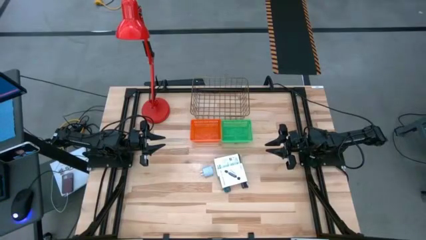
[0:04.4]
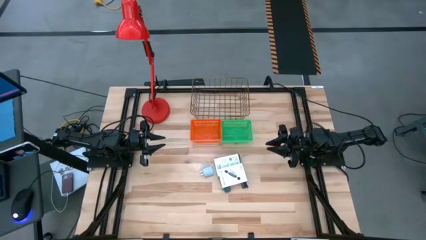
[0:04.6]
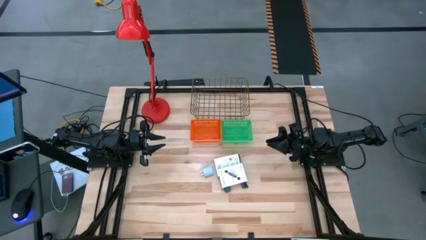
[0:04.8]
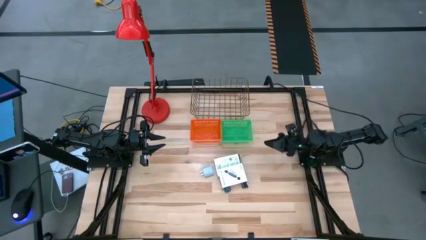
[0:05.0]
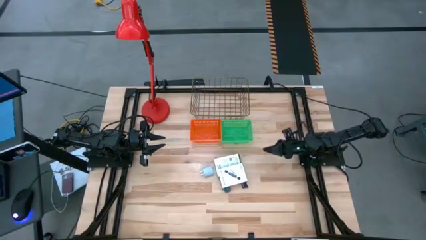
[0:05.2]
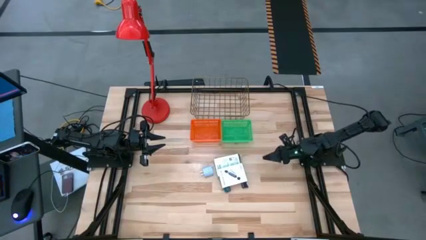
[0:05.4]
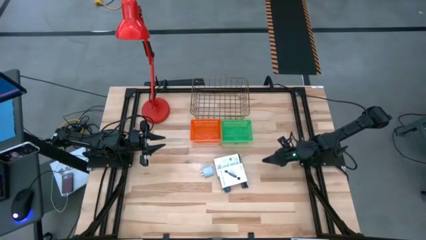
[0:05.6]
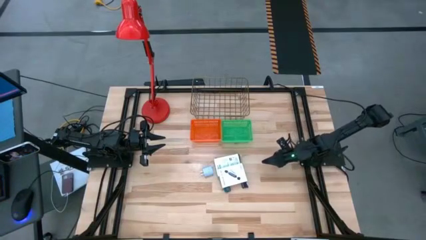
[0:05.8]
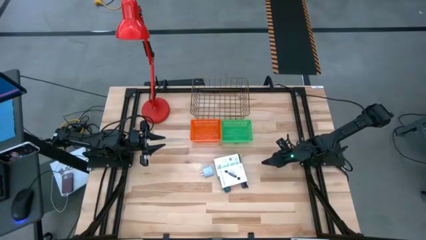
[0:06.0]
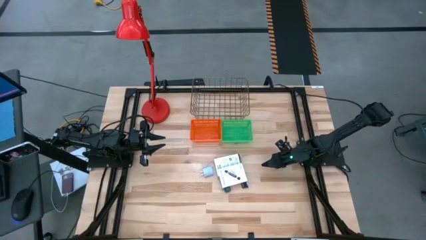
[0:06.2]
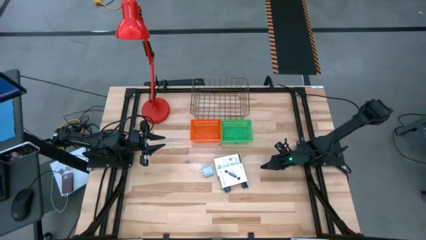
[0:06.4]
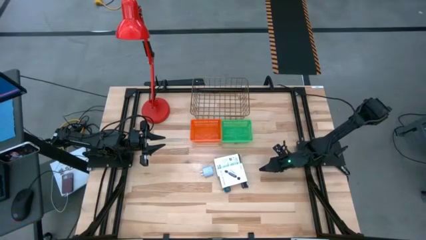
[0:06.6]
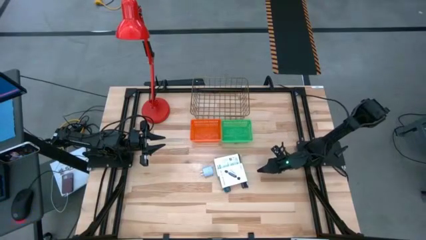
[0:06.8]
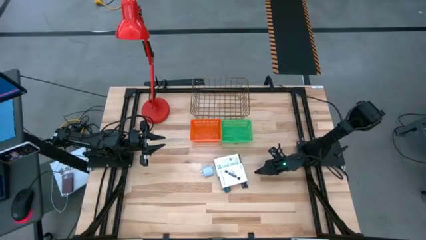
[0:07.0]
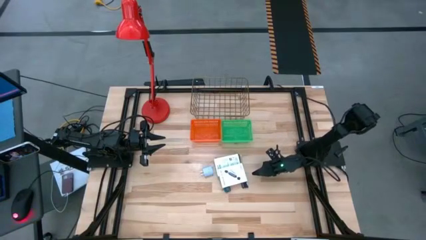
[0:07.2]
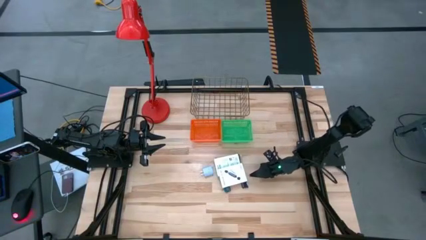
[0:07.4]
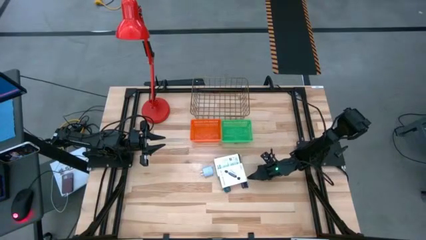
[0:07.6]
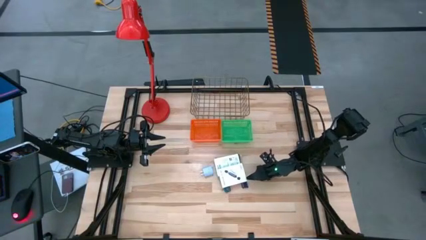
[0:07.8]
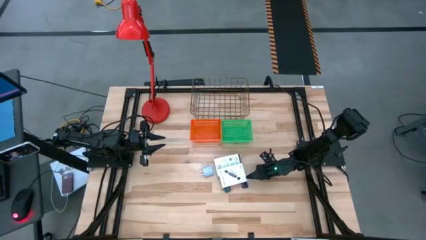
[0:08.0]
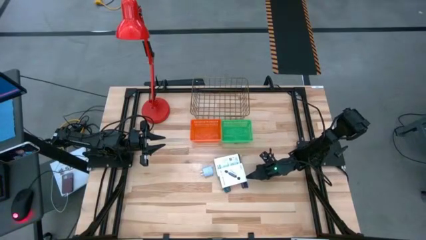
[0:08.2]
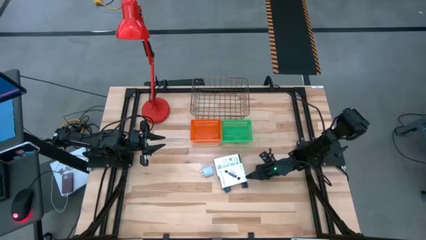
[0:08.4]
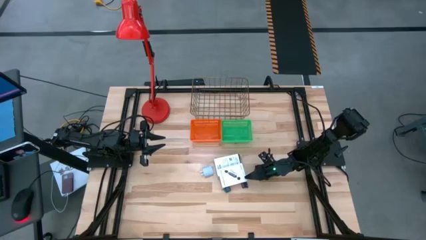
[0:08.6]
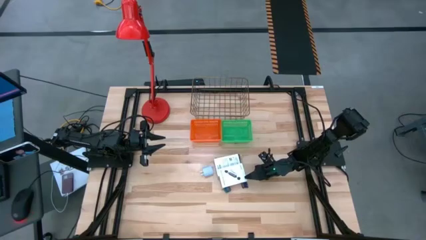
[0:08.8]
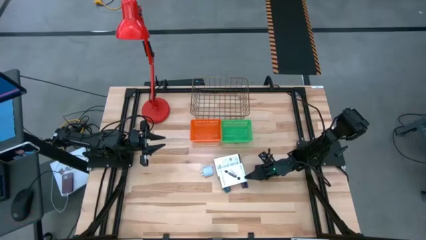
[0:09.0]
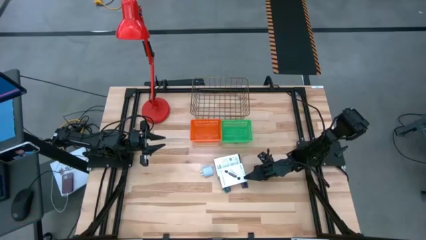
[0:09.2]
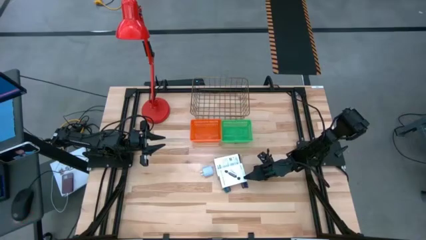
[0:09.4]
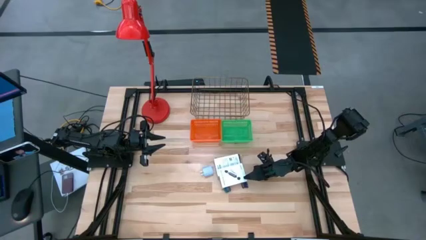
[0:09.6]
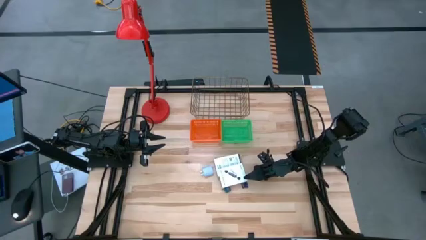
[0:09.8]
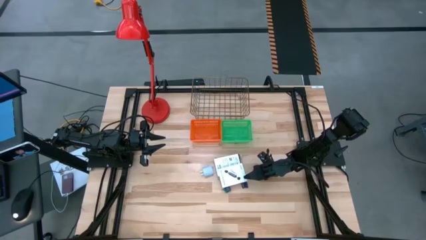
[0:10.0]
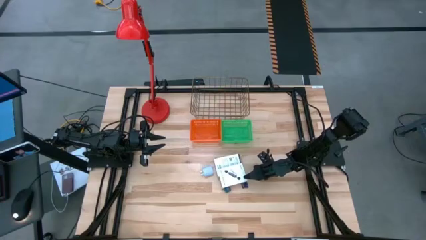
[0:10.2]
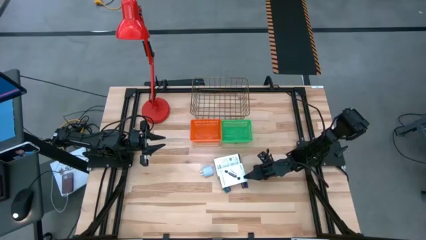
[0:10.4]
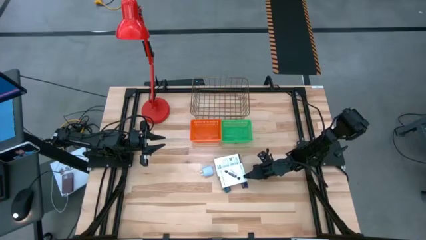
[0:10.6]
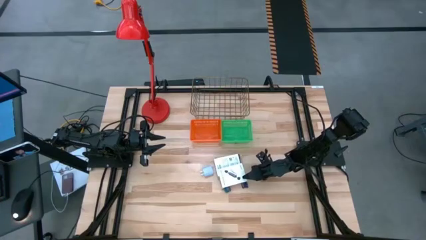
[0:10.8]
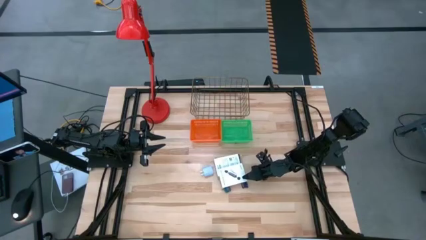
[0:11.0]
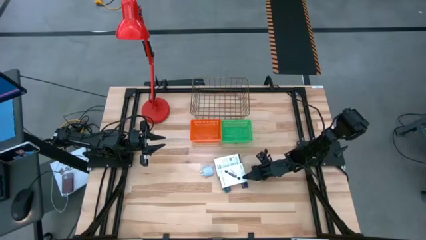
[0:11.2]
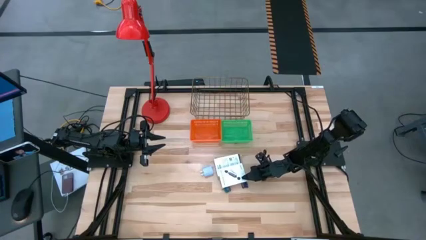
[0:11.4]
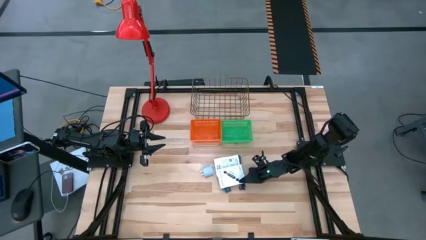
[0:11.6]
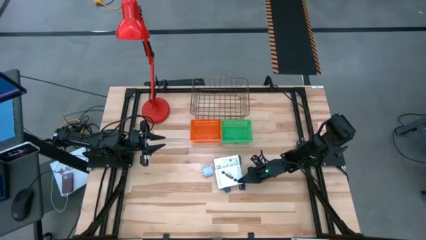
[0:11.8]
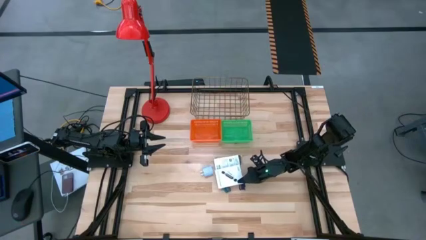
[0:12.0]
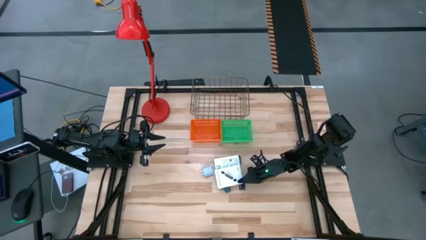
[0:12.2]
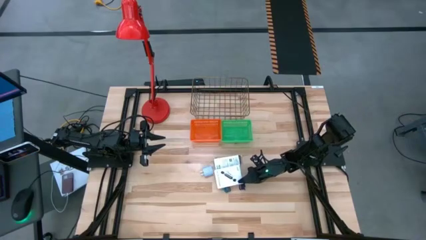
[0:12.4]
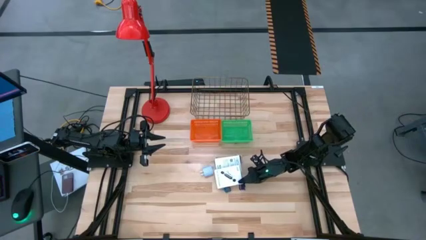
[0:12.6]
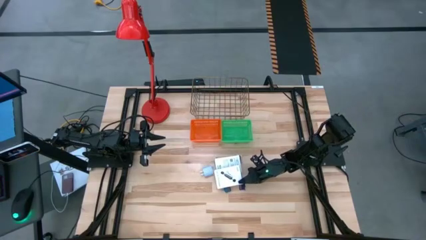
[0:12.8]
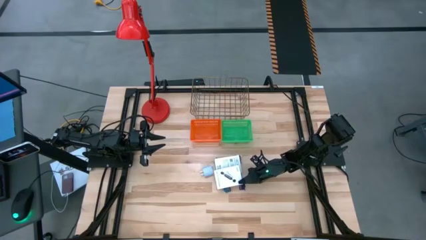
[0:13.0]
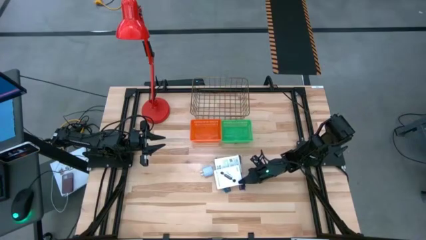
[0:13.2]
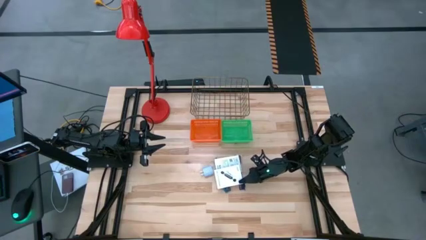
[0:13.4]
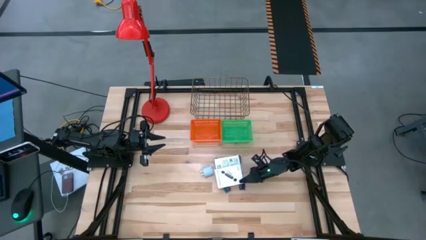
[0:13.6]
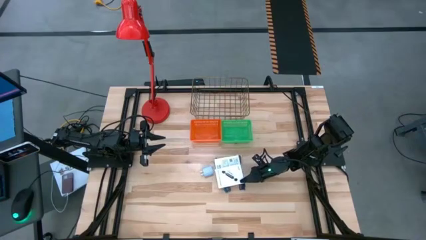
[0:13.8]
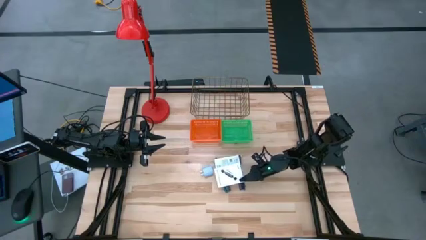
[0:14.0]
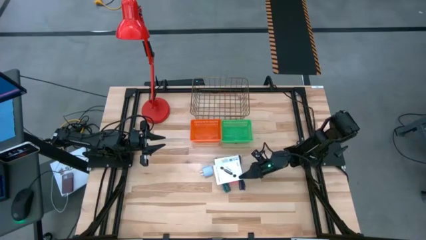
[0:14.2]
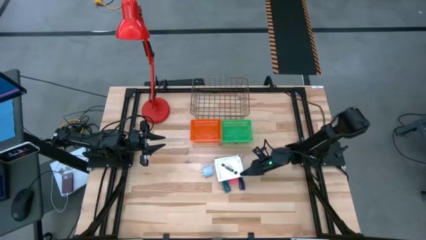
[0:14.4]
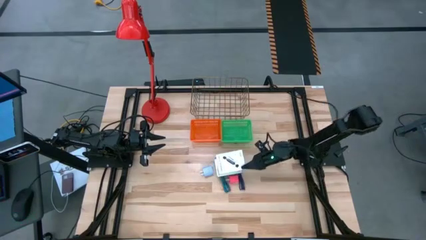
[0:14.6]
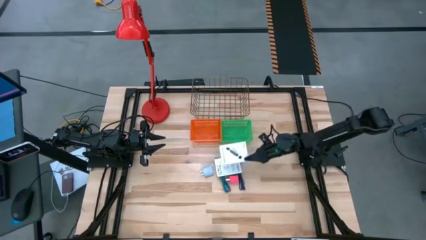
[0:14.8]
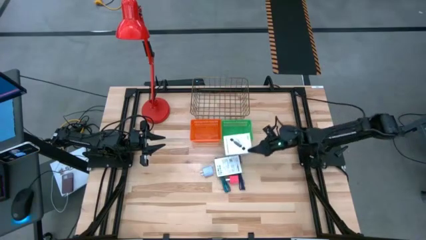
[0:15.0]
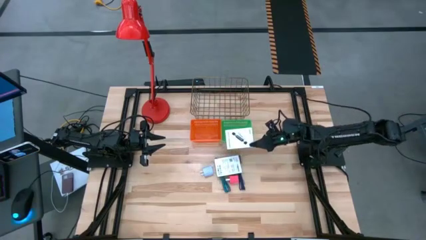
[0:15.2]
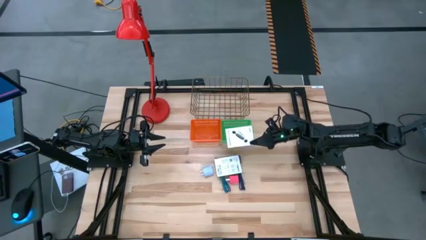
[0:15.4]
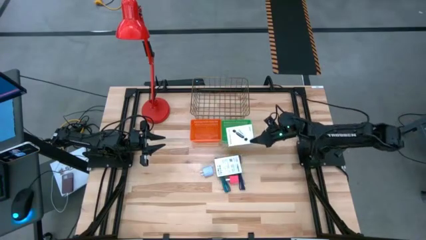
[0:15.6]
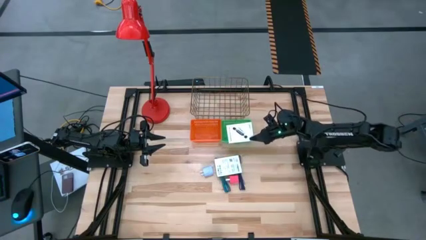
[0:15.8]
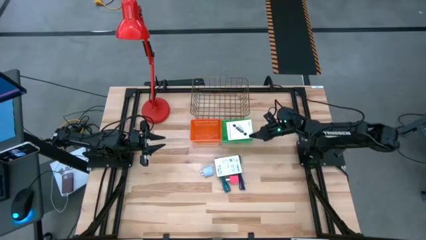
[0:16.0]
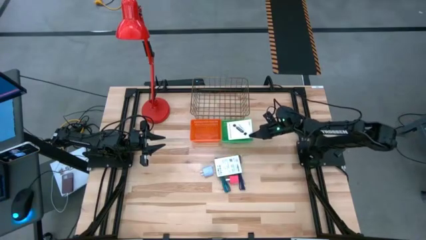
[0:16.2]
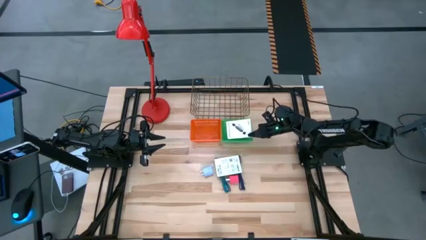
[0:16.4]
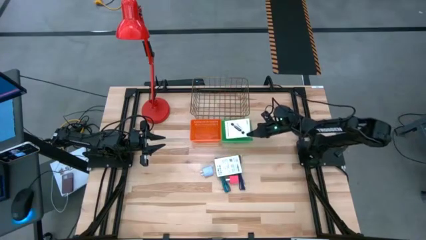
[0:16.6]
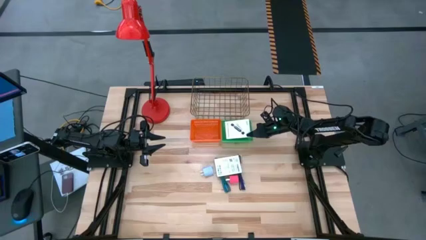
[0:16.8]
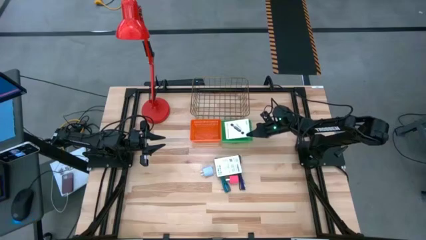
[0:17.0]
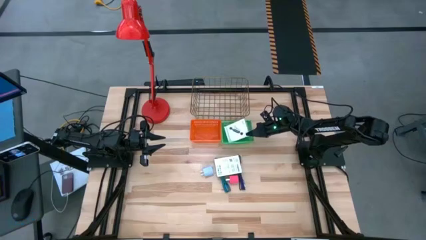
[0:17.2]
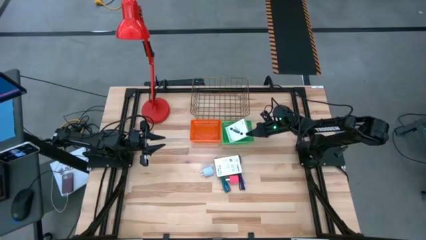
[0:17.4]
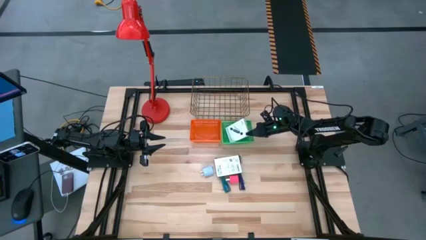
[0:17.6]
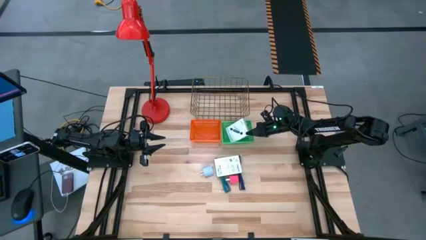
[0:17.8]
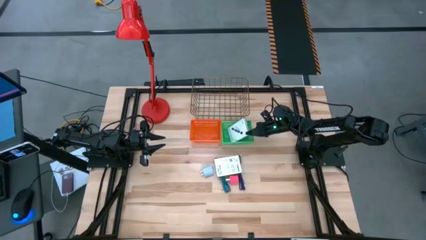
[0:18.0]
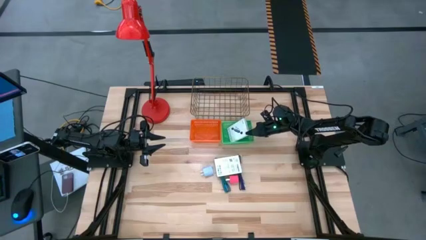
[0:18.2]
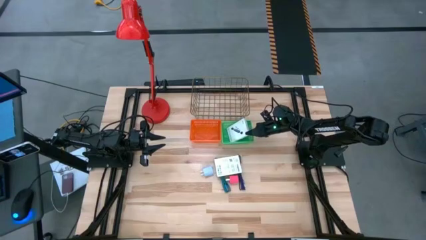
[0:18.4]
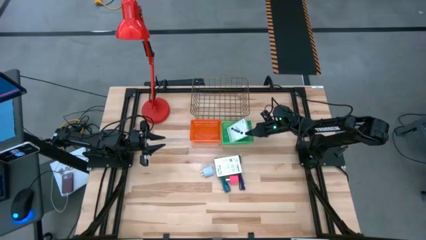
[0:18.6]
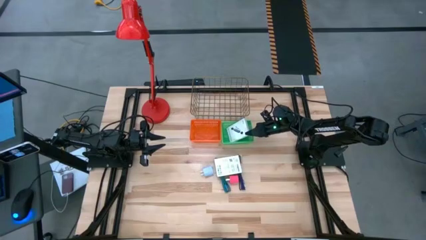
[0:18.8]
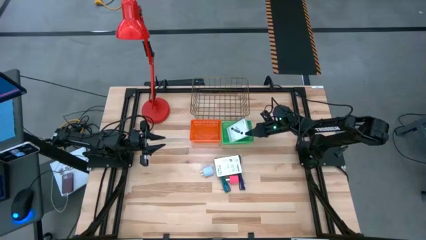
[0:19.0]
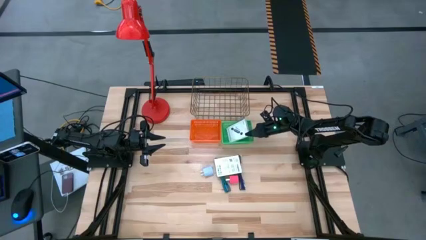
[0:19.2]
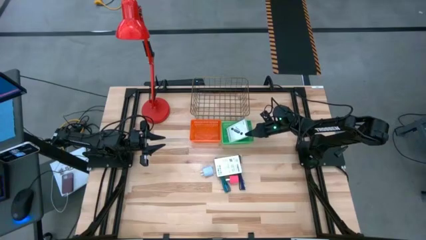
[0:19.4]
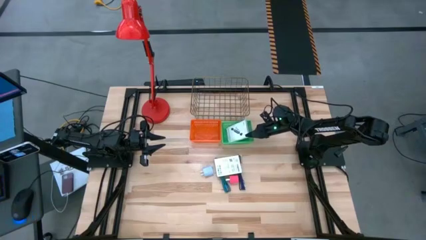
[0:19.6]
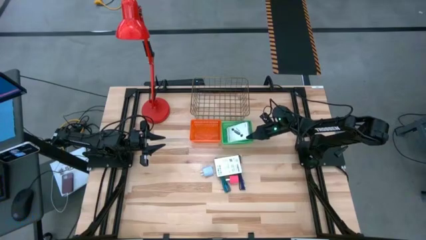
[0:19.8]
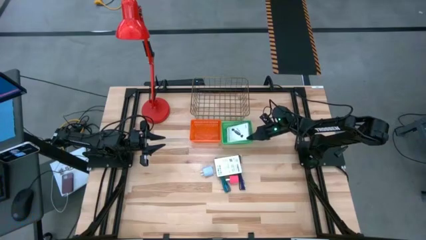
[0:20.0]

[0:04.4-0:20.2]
Task: Pick and place items into bin
Put the top card reader box into the green bin
